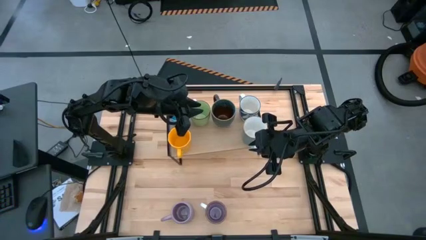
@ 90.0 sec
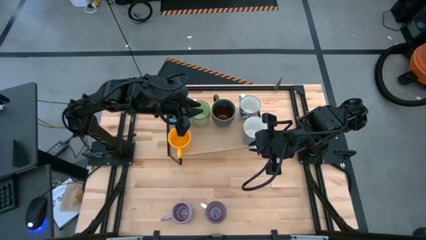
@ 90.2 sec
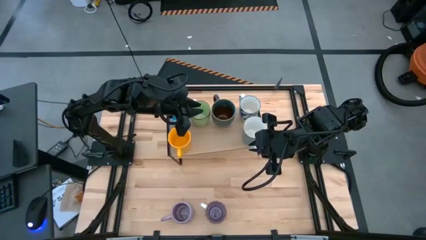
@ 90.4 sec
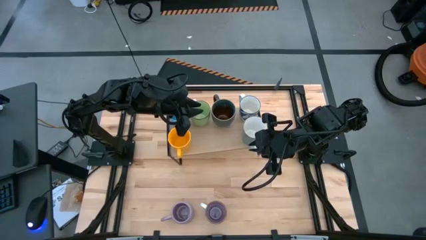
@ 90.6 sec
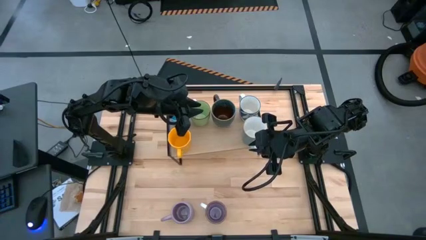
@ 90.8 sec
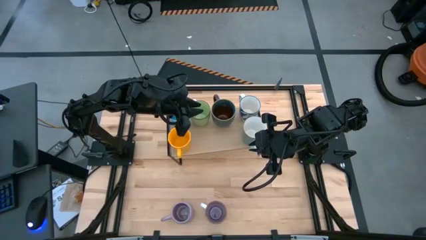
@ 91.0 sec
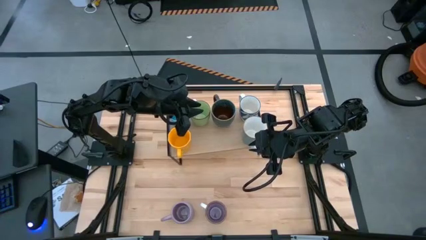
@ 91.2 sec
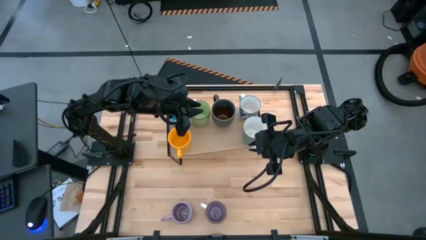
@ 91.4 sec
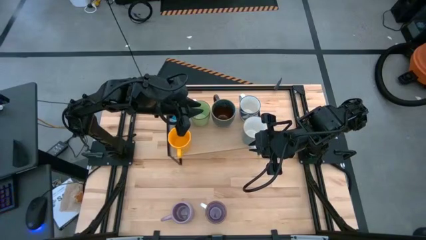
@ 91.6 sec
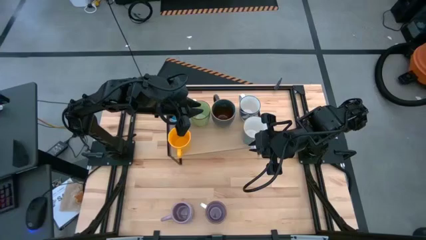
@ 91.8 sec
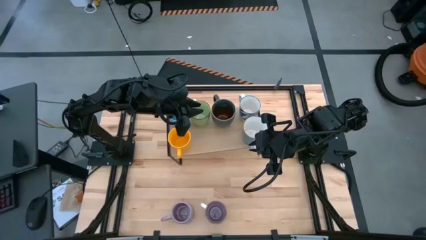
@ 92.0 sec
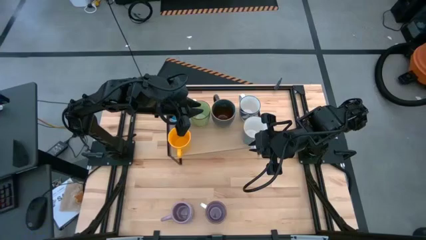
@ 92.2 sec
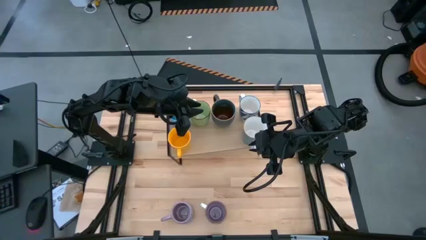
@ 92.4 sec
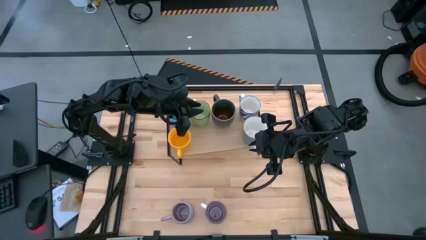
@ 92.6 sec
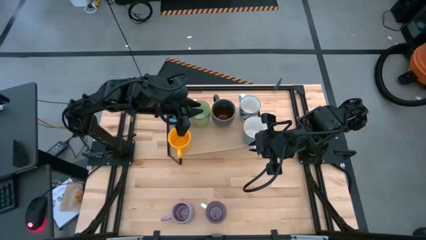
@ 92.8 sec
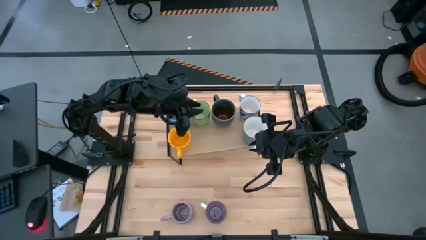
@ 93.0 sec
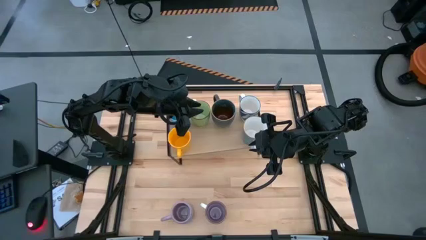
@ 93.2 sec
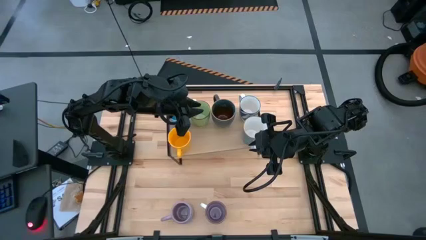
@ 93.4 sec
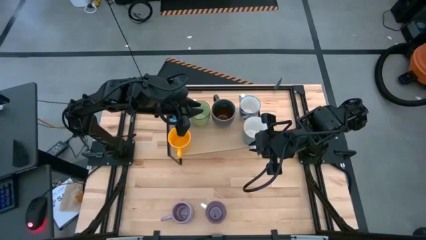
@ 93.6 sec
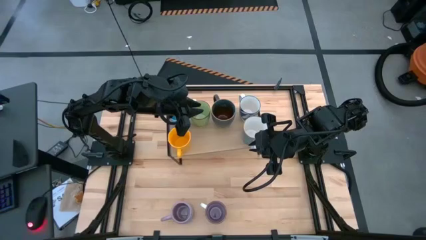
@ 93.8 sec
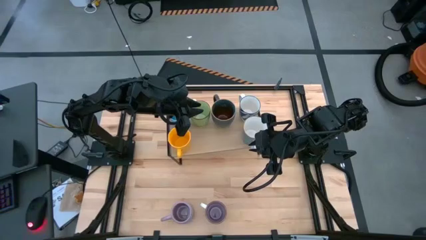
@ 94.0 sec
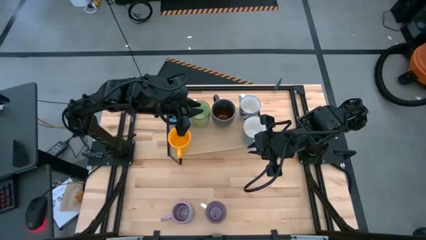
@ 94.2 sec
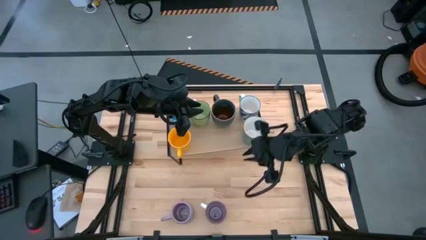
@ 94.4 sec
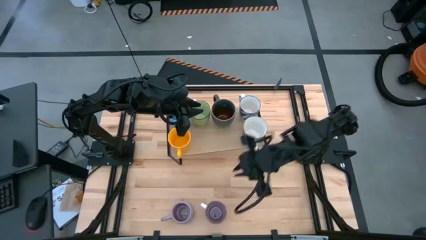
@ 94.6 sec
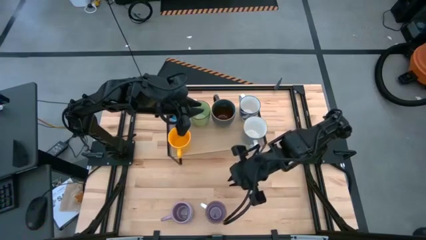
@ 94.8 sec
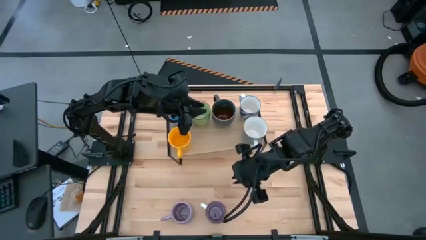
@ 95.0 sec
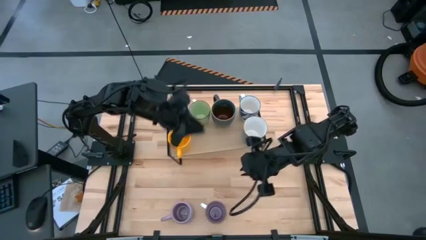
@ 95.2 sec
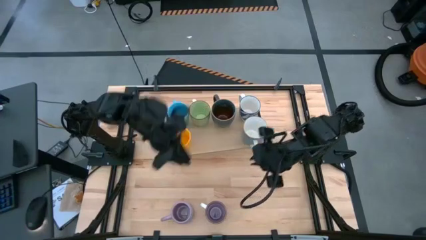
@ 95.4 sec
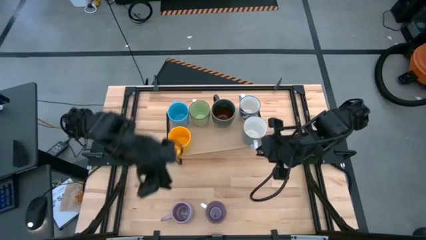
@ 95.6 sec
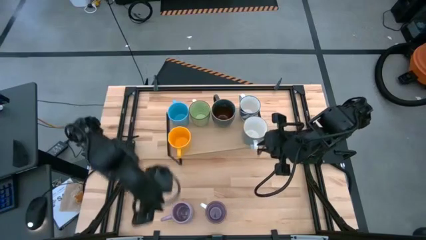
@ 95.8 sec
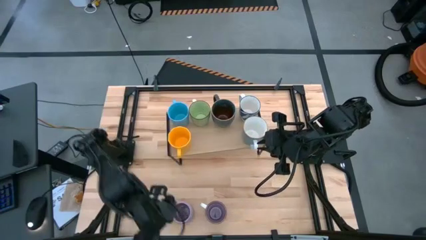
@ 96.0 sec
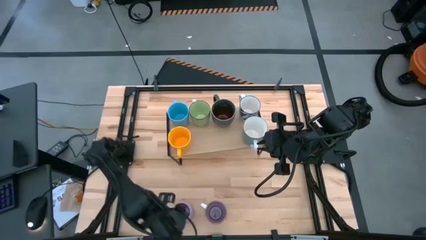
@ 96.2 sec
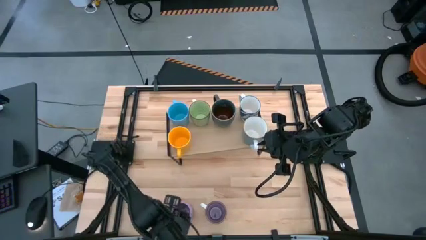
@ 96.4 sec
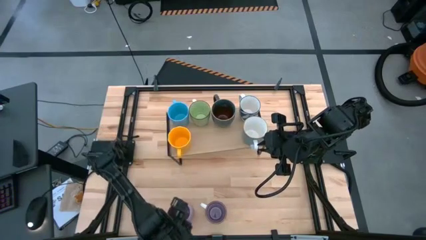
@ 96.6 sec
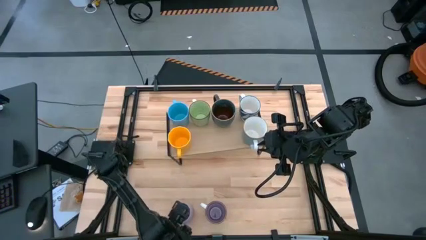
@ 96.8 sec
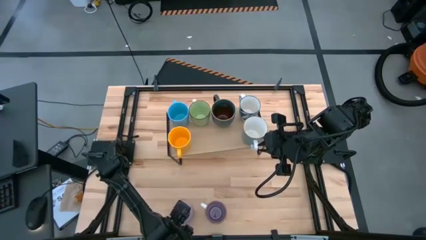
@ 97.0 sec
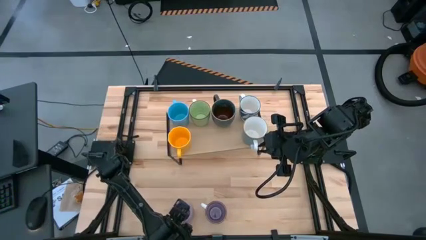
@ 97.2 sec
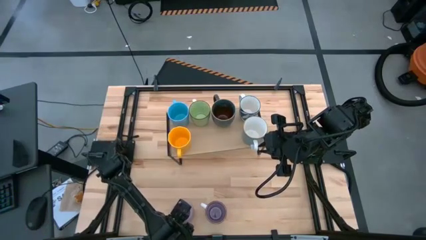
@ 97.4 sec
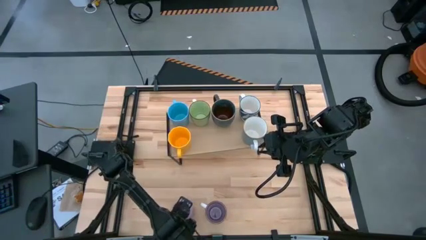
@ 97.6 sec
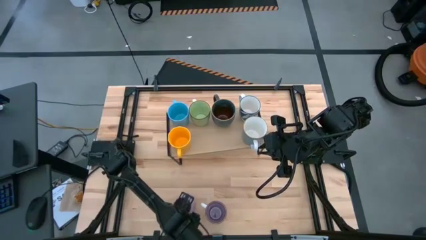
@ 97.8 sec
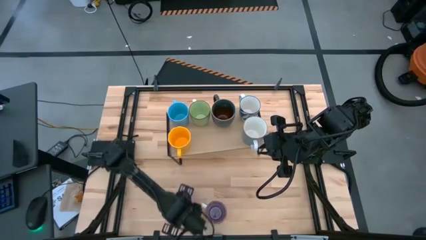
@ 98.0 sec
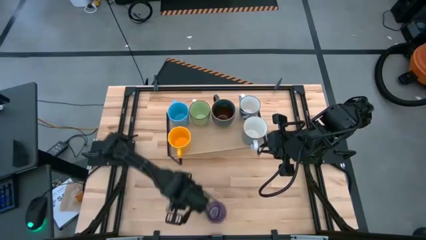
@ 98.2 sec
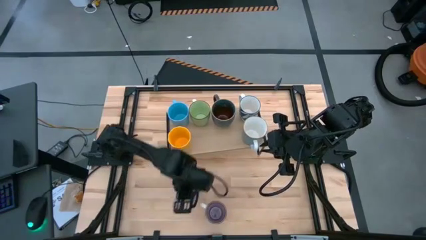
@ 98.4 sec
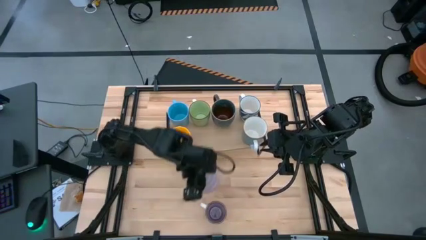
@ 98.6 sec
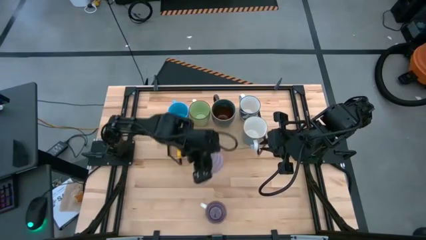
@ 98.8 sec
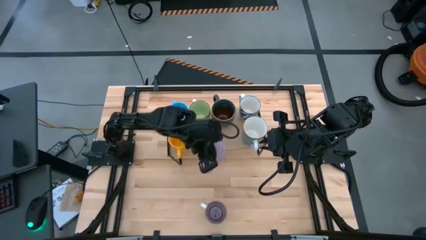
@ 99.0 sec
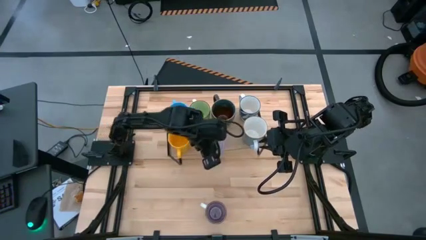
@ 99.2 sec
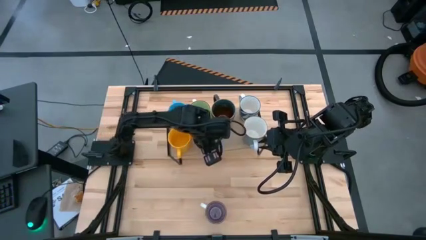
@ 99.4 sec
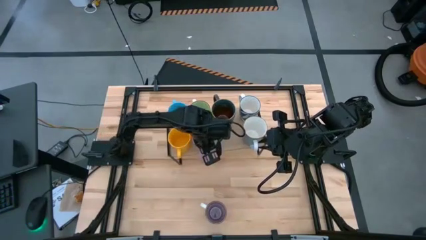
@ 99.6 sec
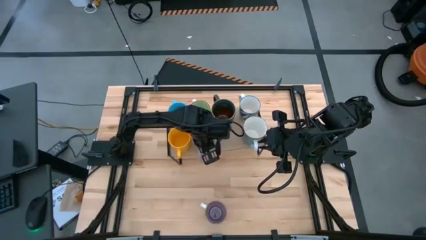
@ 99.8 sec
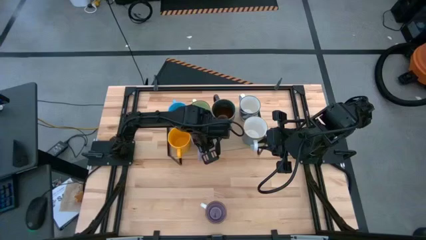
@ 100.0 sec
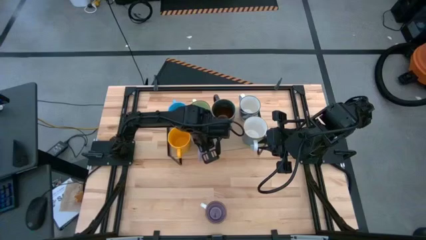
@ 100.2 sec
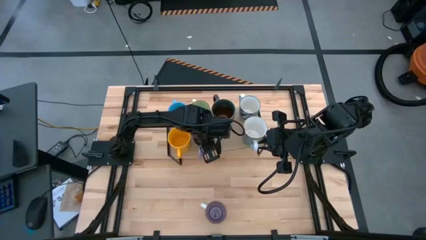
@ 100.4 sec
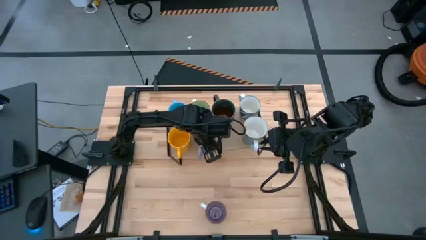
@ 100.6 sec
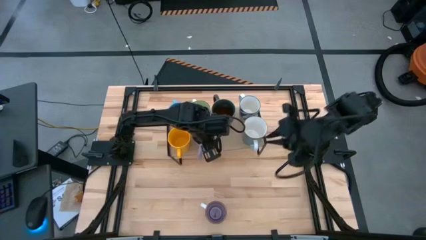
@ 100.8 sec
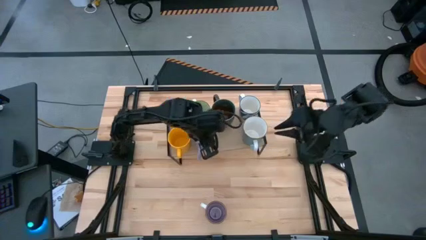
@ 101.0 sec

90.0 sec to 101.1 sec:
Task: Place coffee mugs
Put the left purple white mug on the shelf
